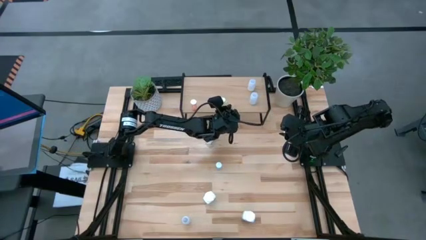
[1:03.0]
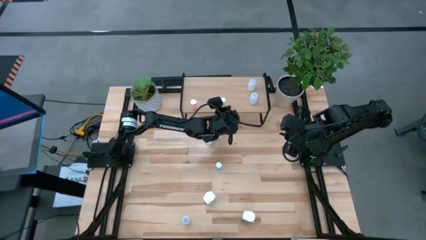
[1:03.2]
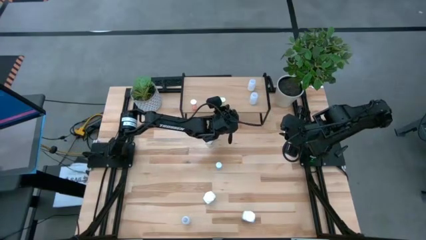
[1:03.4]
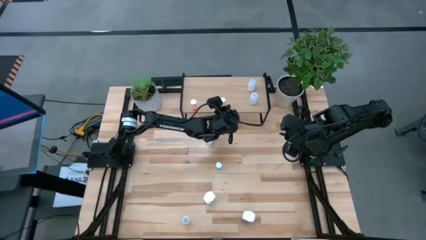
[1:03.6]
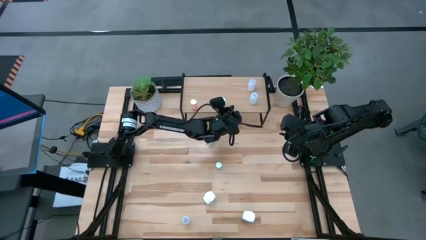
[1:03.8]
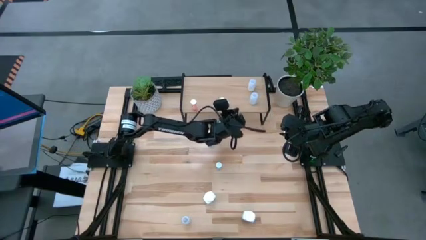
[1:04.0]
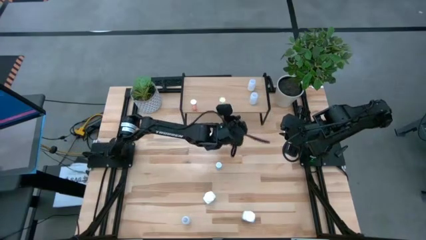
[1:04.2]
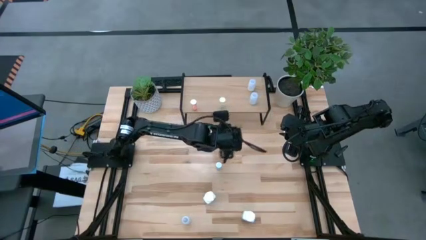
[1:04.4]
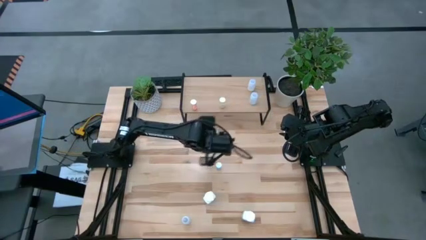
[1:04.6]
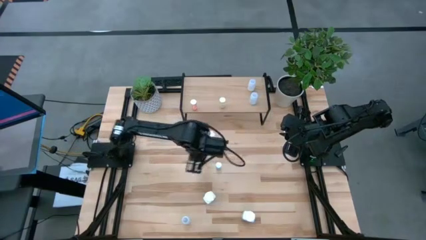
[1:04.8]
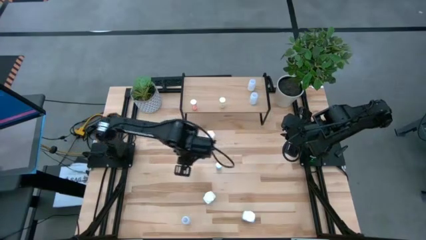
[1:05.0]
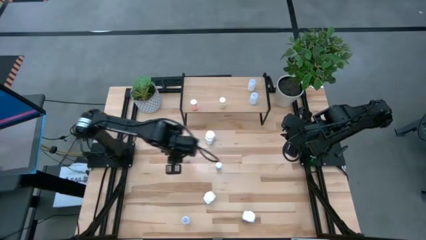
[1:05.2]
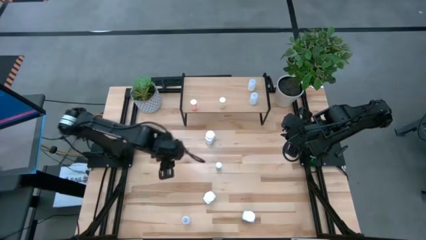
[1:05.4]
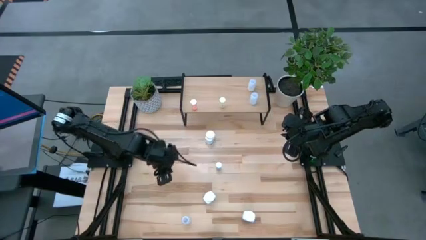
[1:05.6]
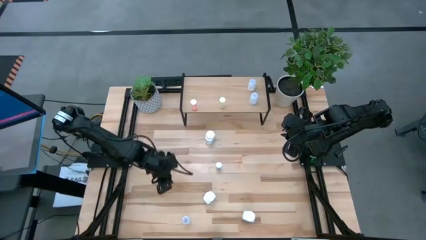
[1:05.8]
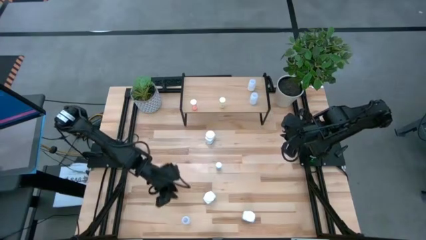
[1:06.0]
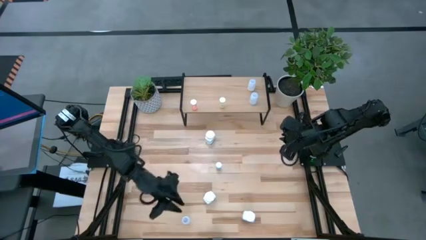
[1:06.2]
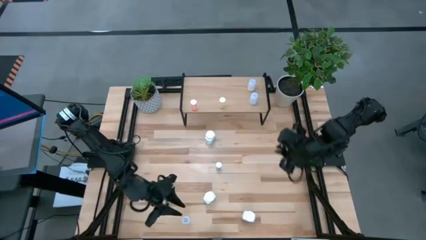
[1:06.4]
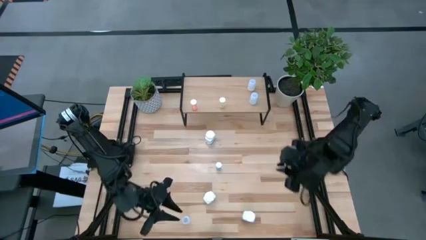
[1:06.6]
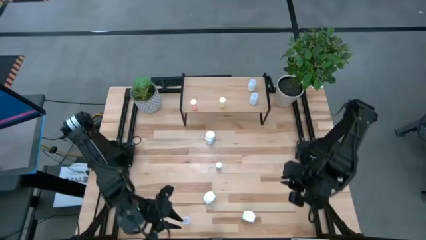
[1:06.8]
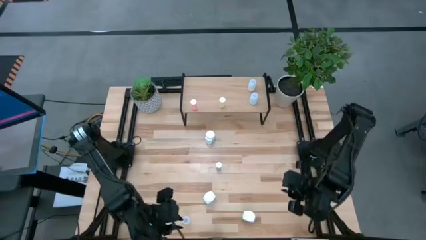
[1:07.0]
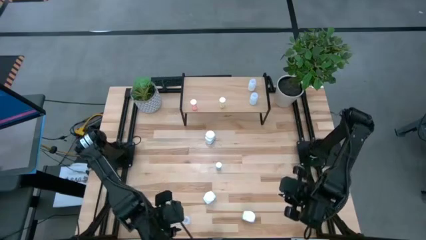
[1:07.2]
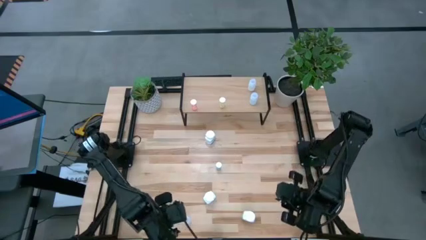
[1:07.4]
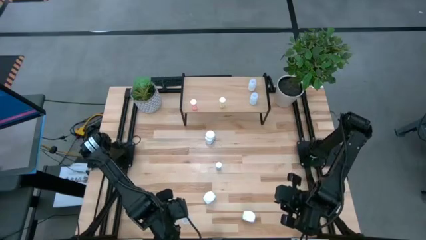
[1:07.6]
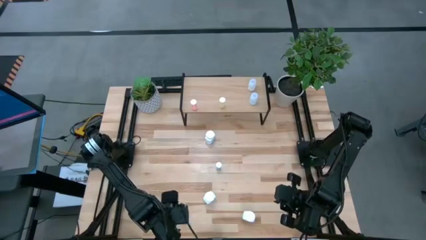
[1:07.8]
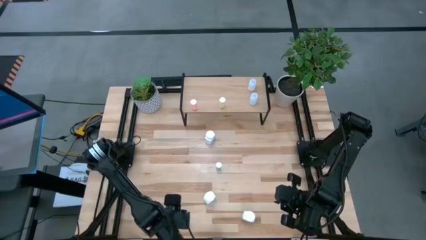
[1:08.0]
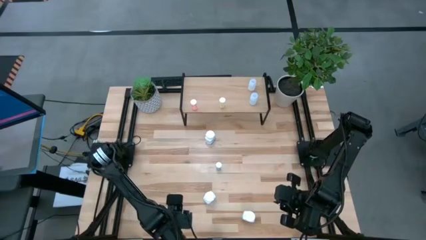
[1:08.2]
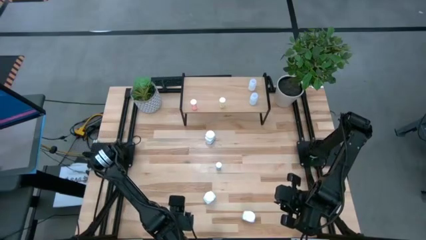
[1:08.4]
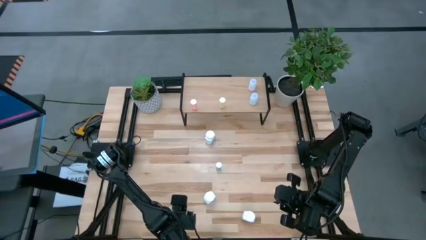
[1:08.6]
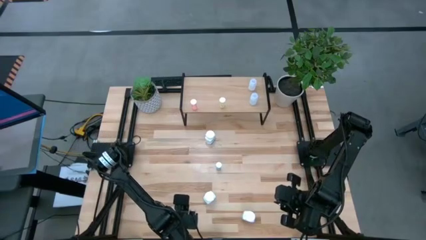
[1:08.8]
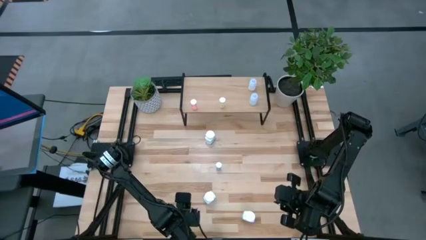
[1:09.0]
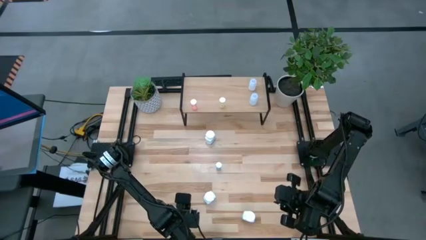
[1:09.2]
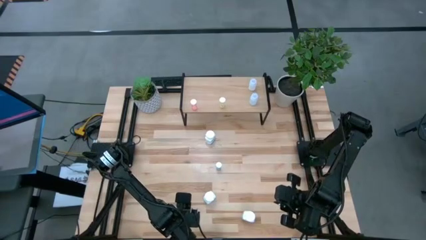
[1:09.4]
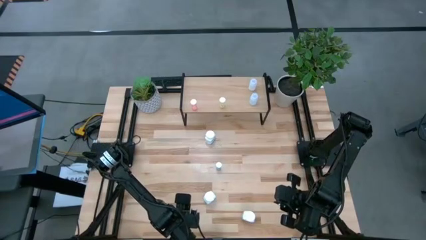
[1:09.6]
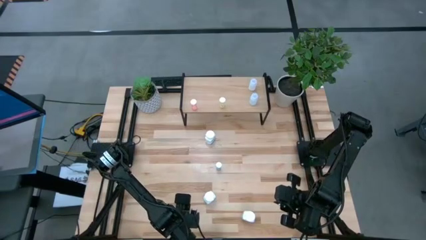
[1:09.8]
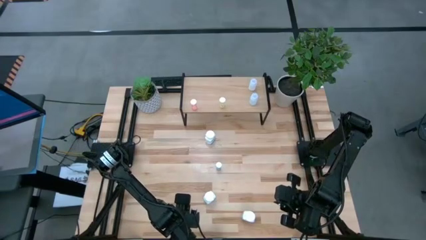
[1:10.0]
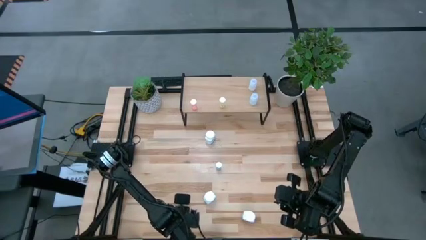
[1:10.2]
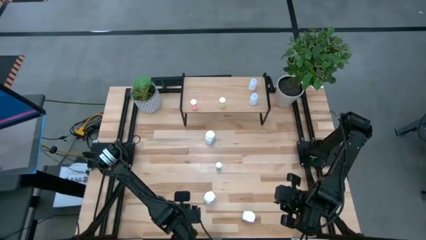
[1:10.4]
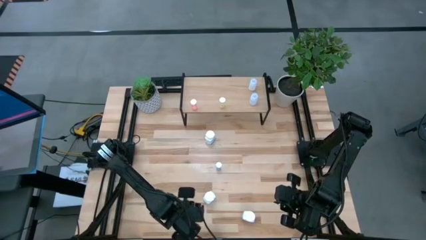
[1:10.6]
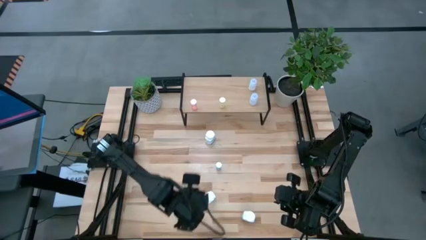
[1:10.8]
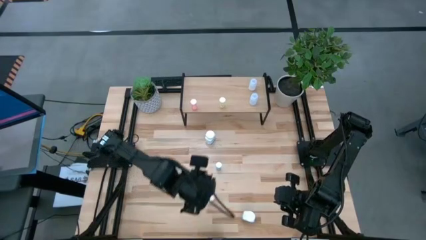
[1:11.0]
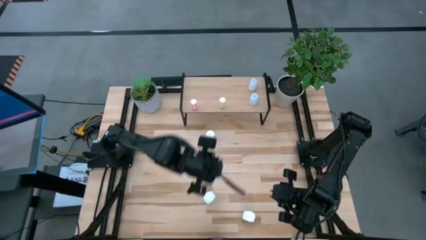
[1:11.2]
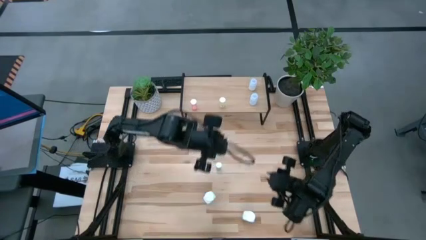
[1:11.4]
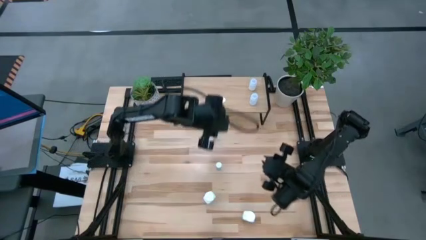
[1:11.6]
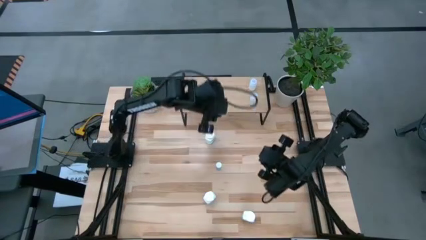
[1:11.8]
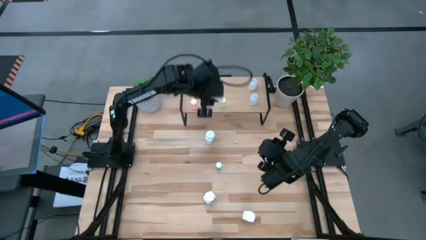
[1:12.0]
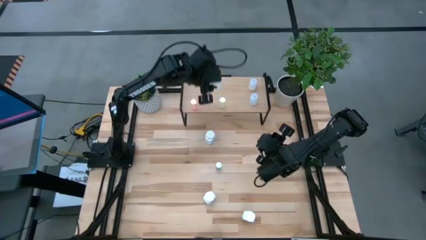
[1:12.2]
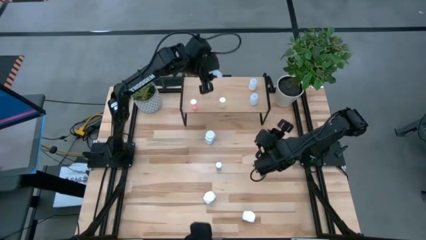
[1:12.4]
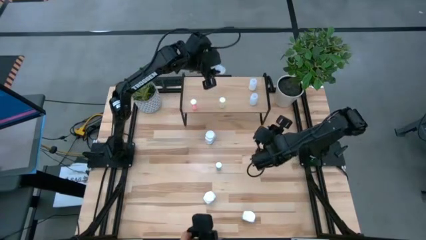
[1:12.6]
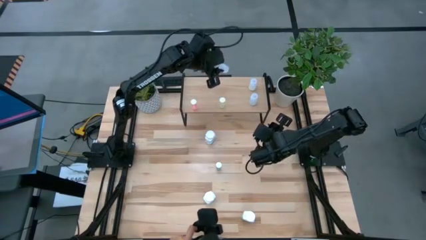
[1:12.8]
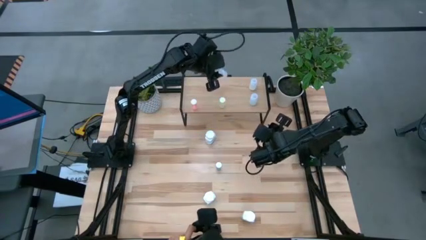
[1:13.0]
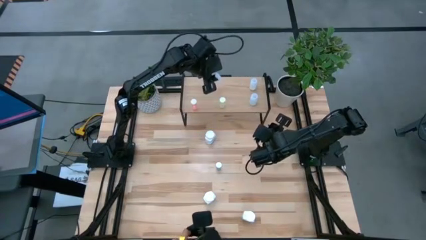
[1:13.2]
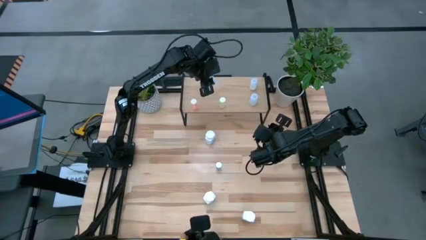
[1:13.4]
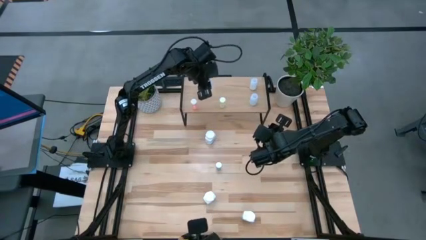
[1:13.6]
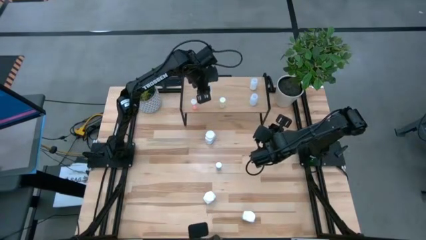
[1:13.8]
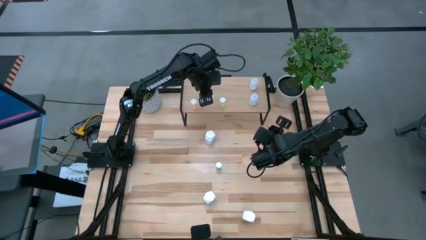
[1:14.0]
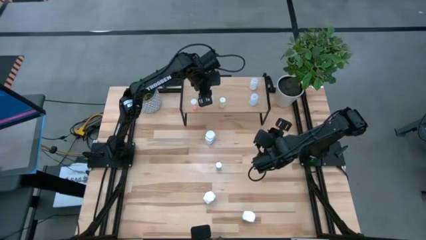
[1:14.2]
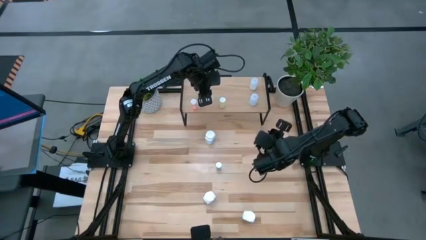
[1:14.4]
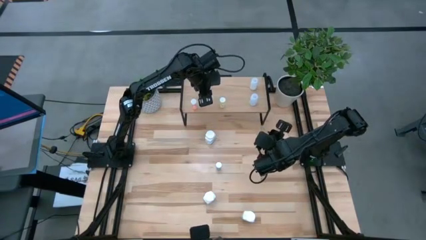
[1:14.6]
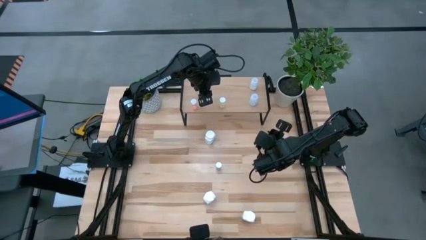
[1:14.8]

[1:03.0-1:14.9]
Task: Pick and place medicine bottles onto shelf by color
Put the white pill bottle on the shelf
